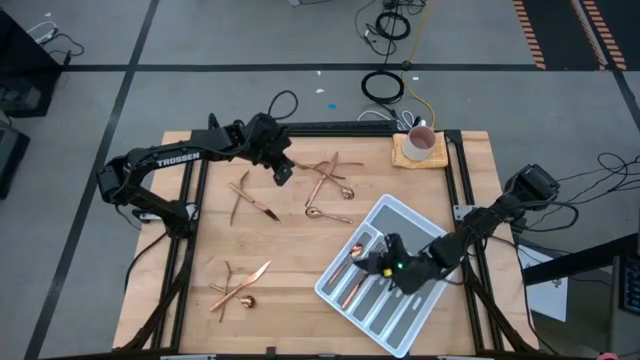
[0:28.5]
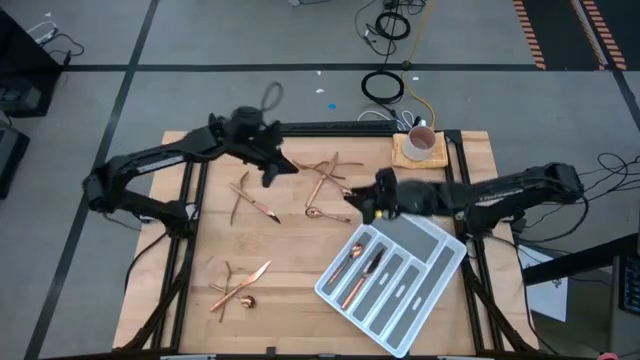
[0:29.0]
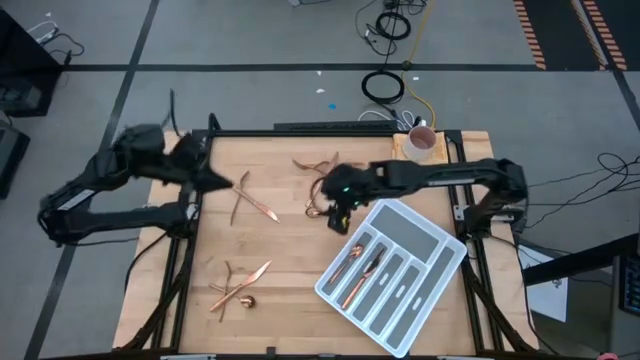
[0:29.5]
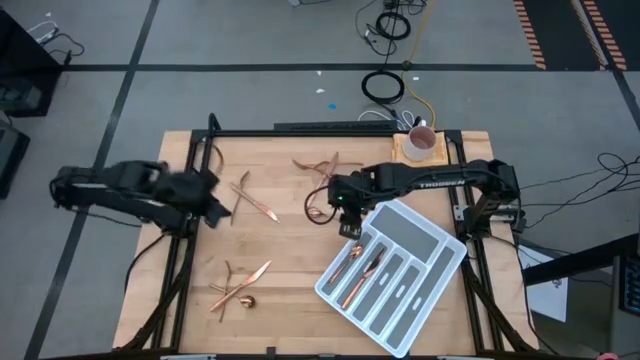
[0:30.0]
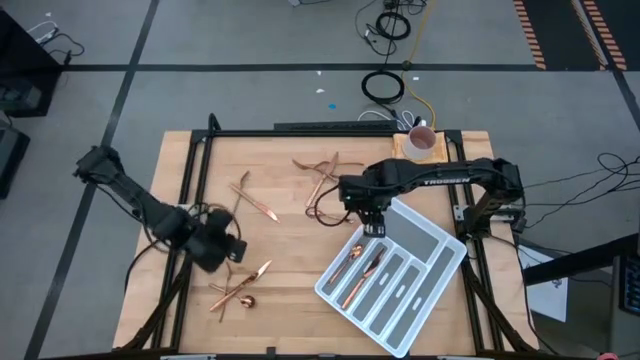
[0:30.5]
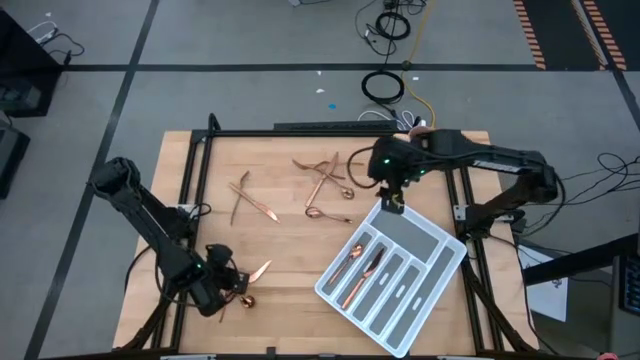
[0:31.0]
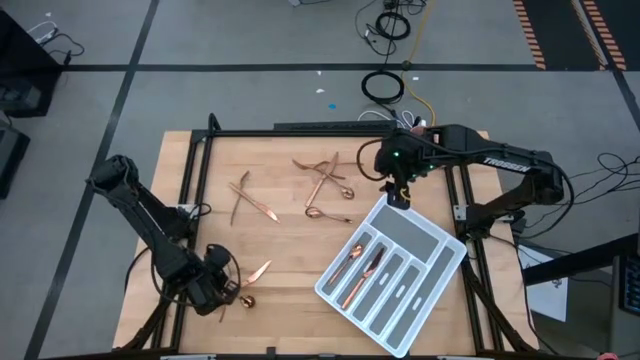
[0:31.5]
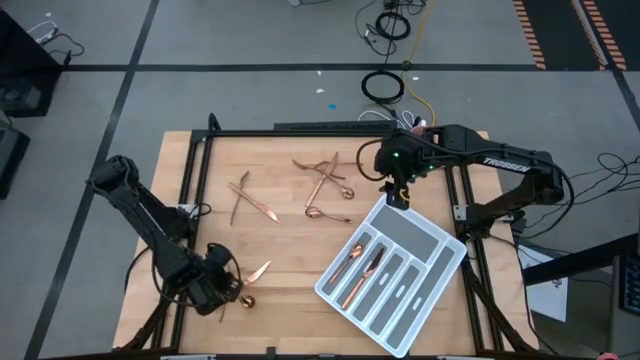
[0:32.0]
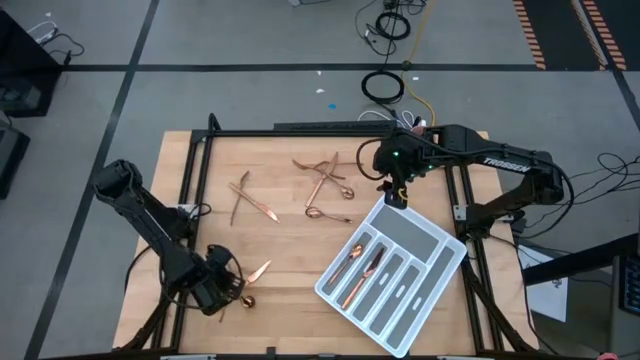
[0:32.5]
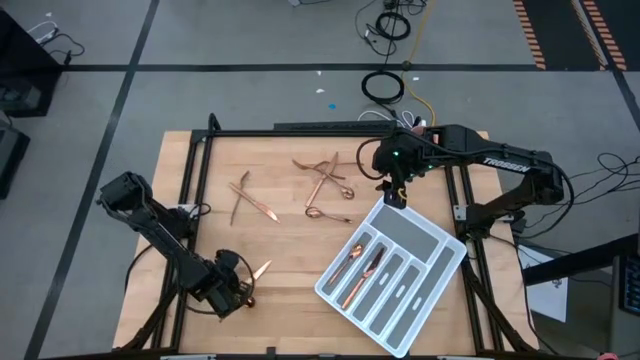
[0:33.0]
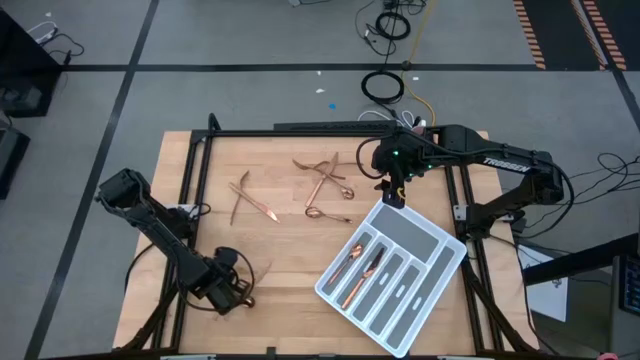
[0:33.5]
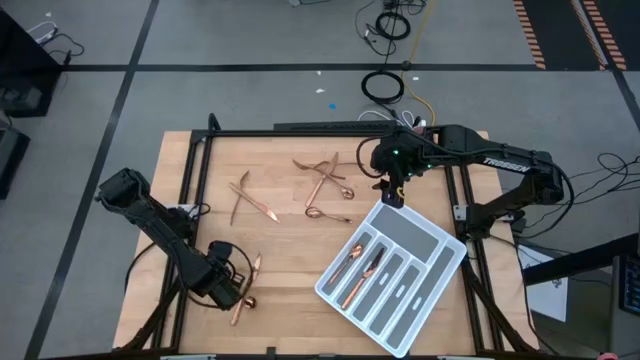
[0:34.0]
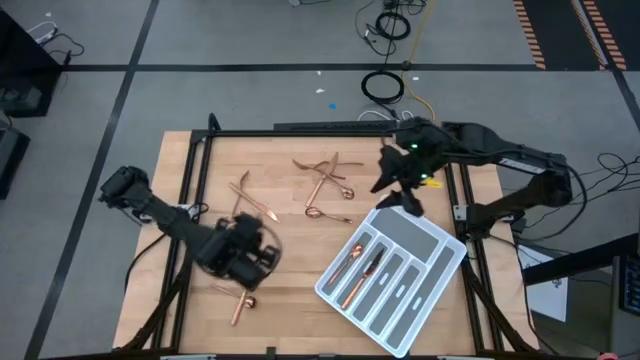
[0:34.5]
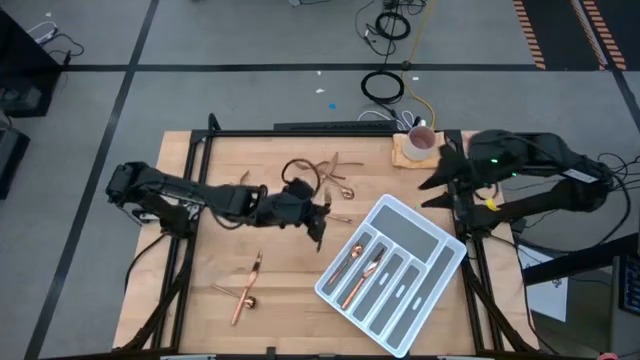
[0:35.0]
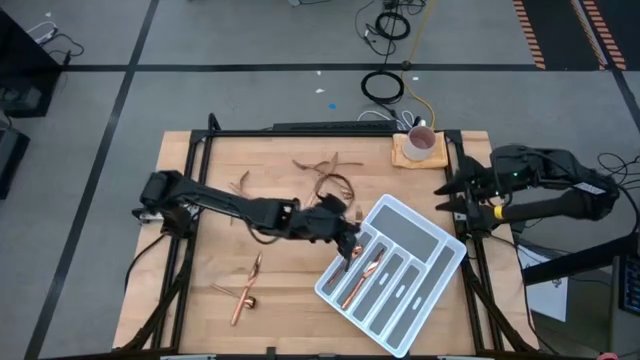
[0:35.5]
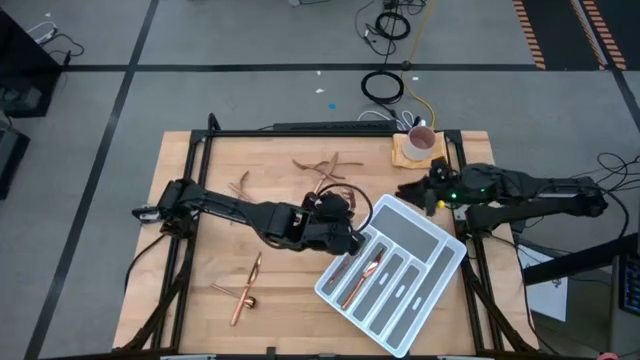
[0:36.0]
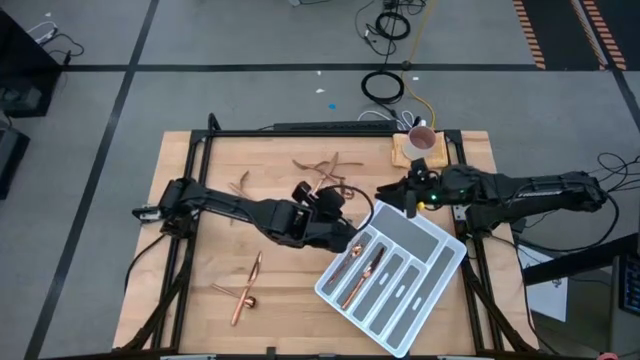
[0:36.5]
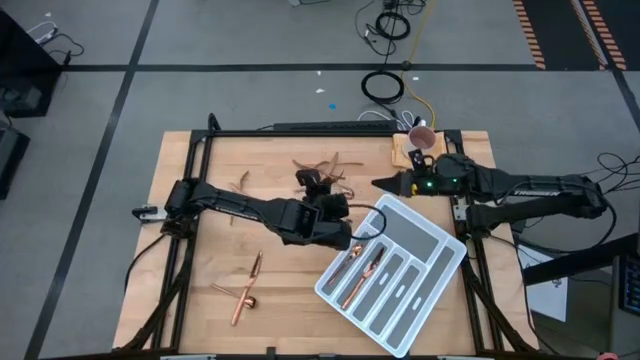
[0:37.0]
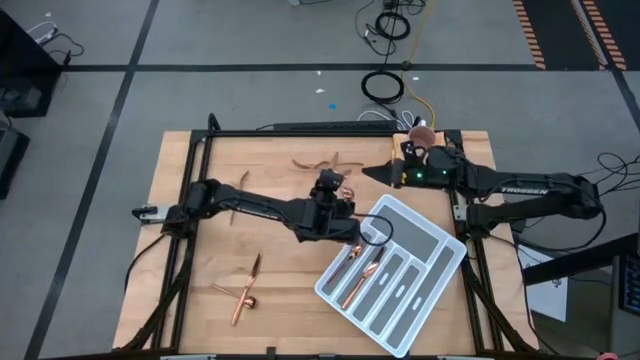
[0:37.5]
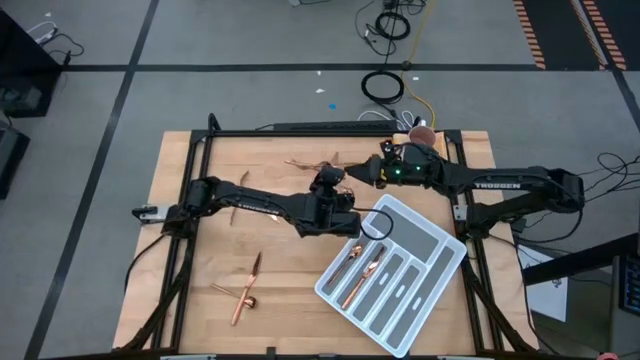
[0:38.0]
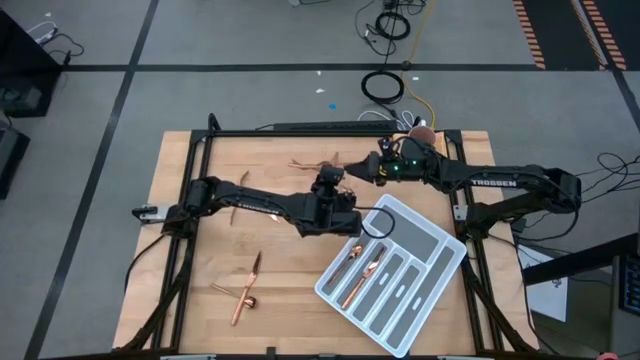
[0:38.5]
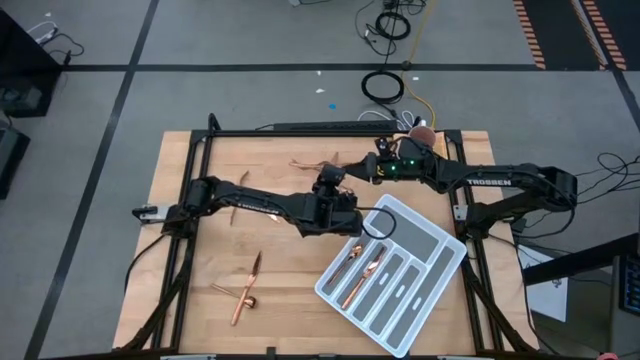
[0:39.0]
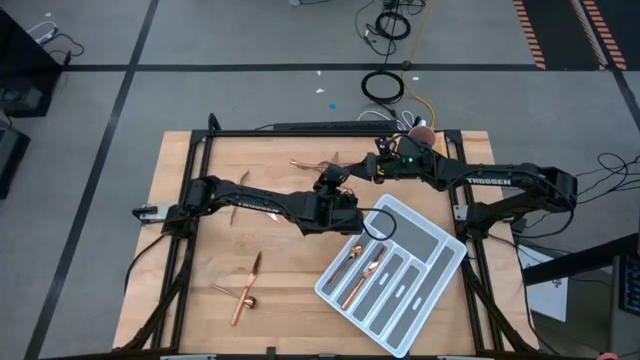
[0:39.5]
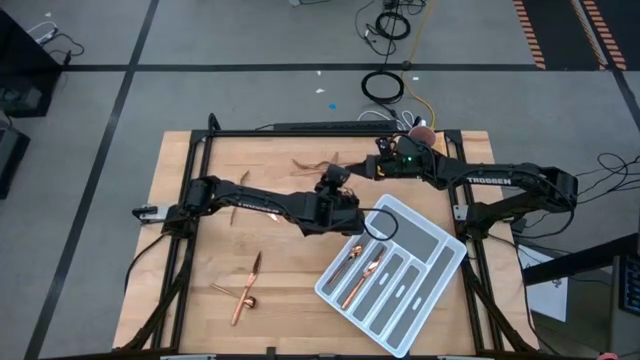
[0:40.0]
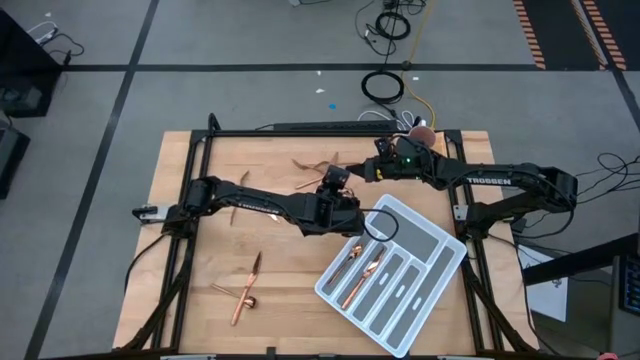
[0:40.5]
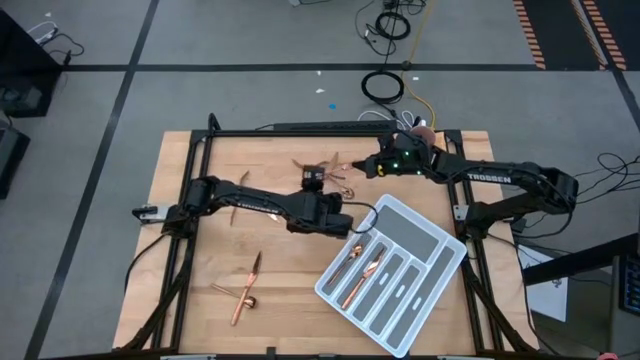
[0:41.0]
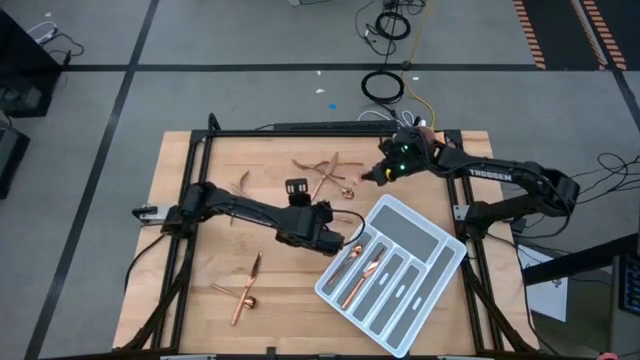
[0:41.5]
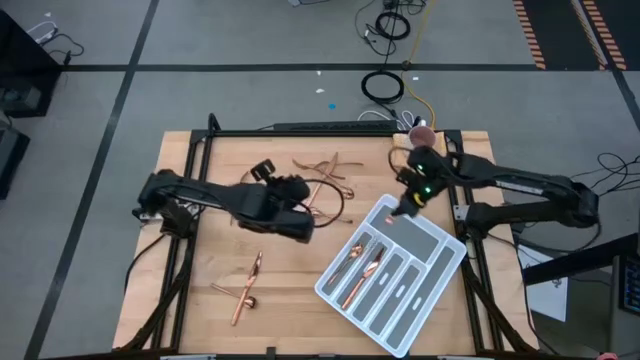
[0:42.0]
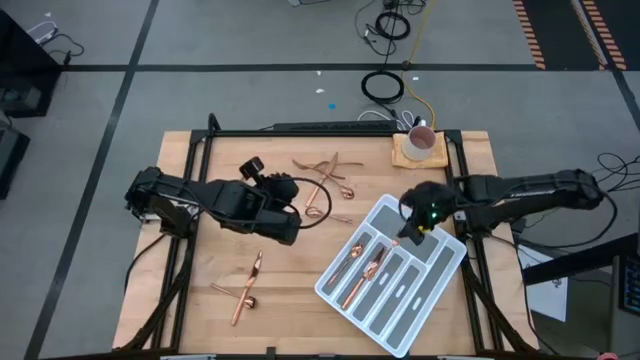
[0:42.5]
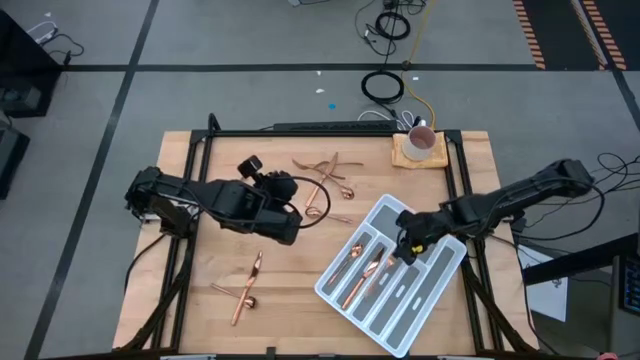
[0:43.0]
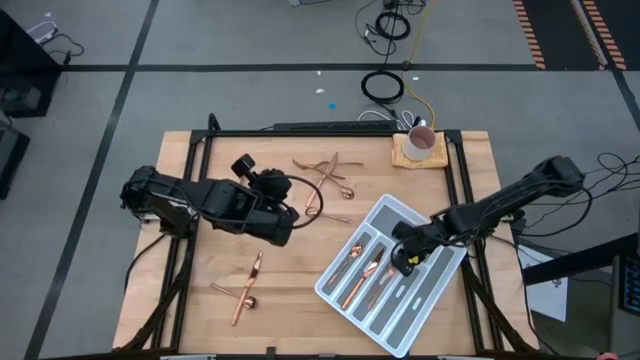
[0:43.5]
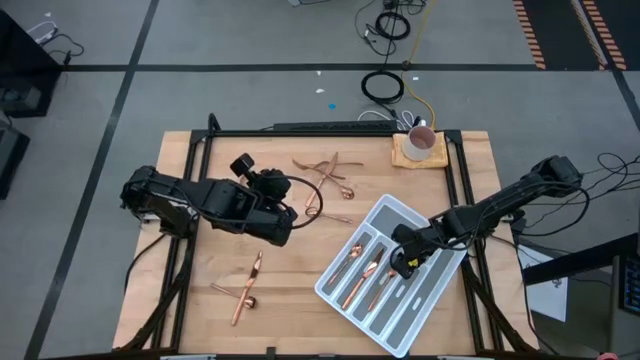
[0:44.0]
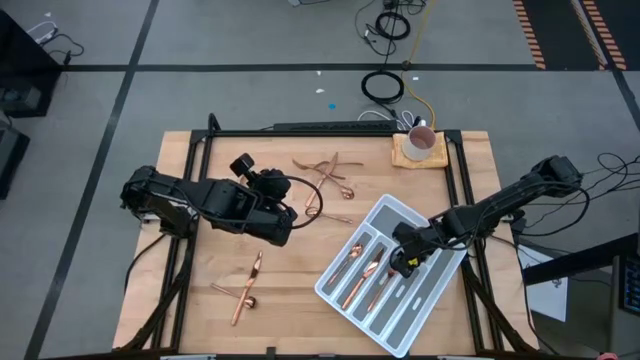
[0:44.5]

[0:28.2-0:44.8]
Task: Sort silverware
Put the gold fork into the cutlery tray

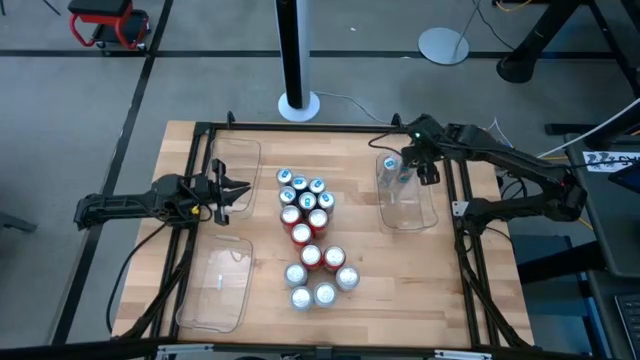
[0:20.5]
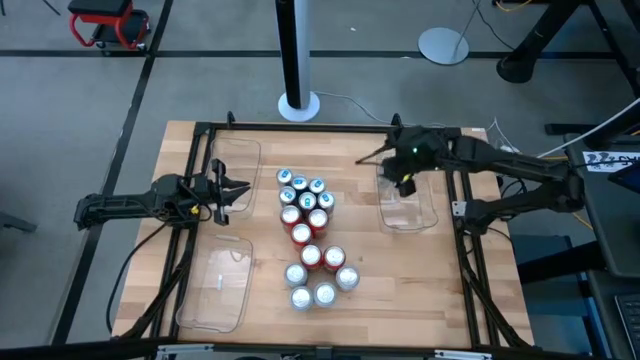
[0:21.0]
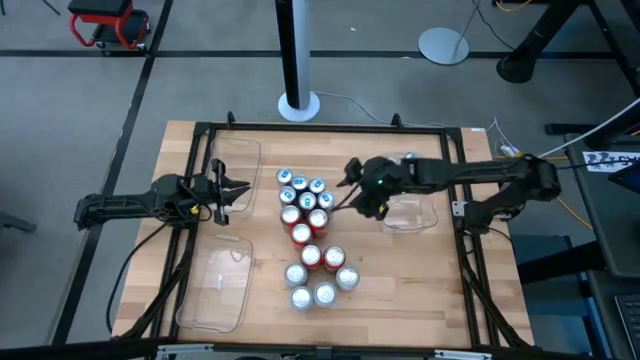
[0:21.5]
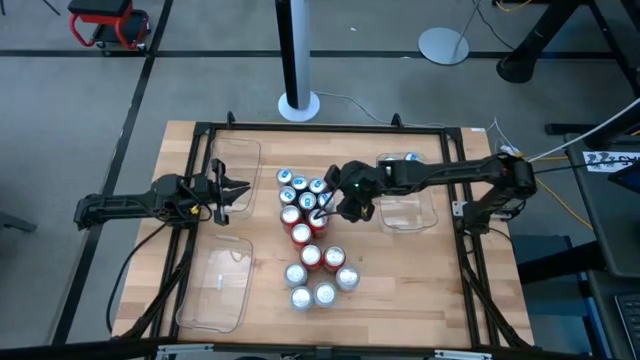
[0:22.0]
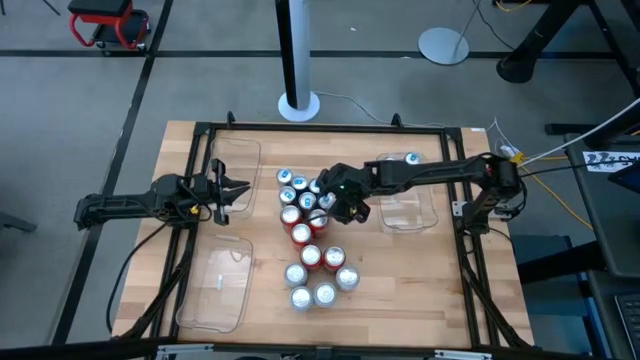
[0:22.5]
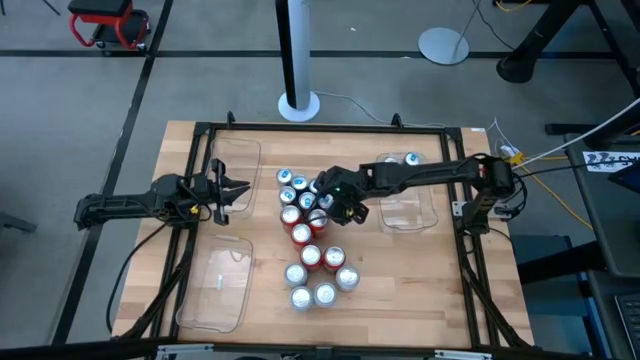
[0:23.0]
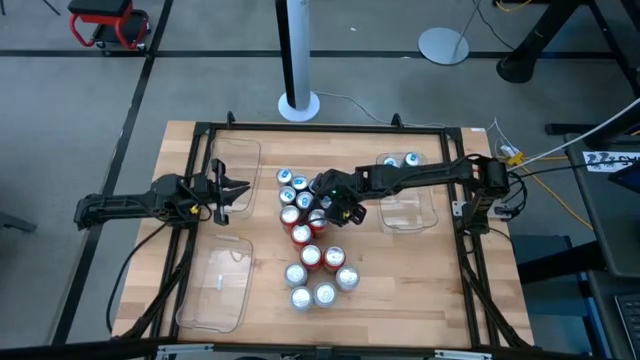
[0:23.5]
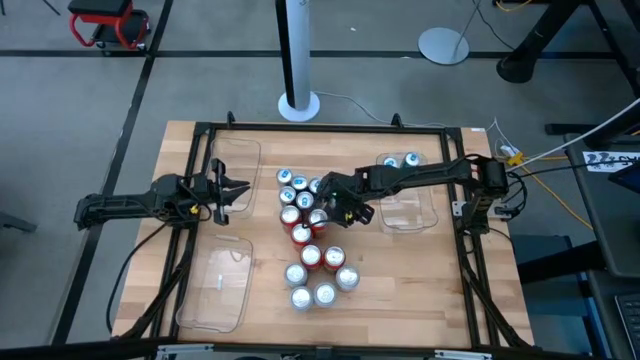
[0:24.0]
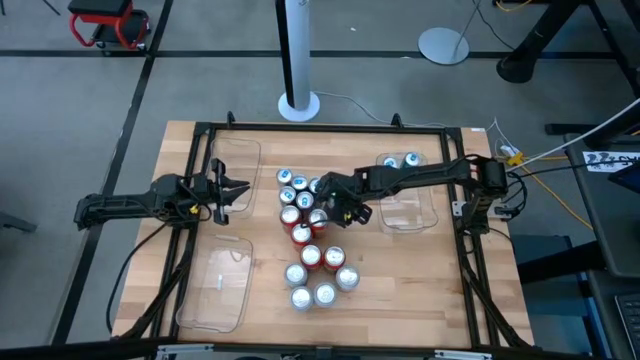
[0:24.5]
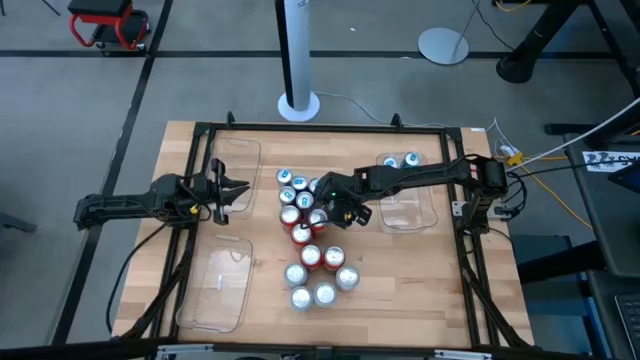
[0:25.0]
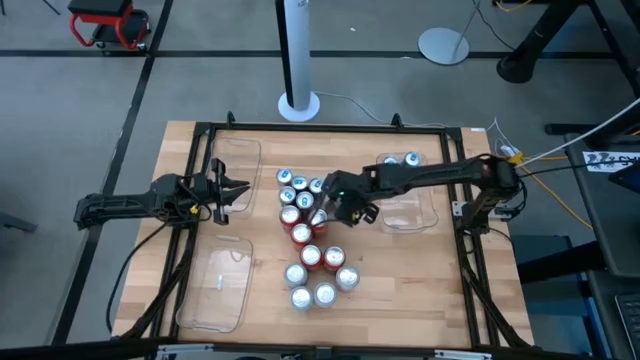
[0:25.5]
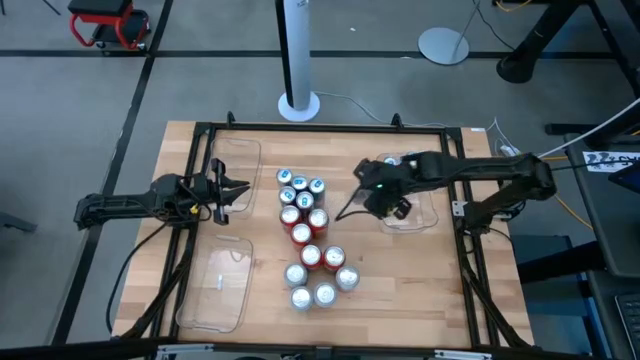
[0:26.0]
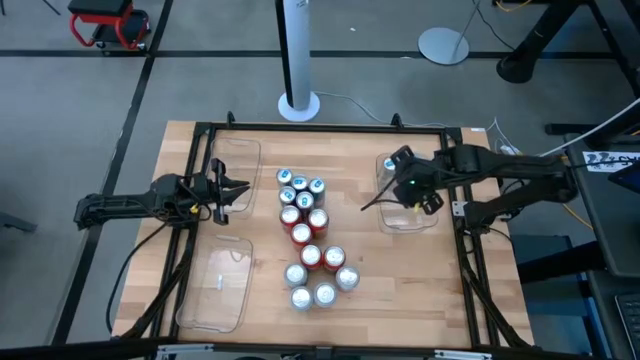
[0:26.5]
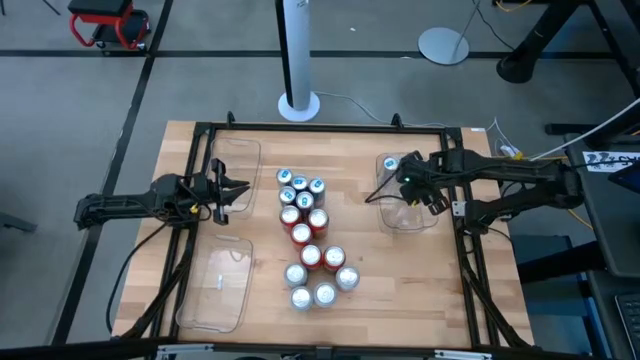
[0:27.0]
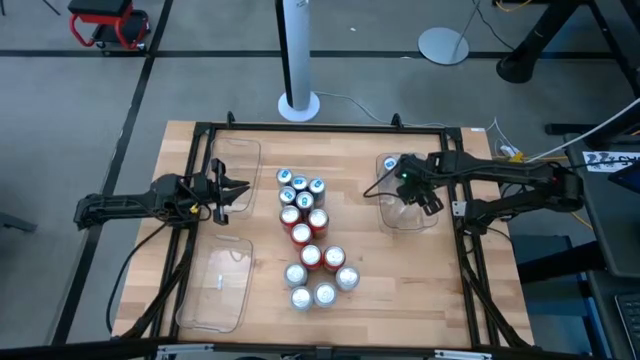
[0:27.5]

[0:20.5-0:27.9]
Task: Sort soda cans
Put the blue soda can into the middle right transparent bin
